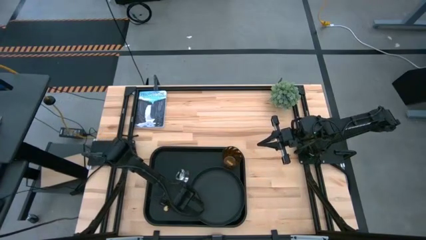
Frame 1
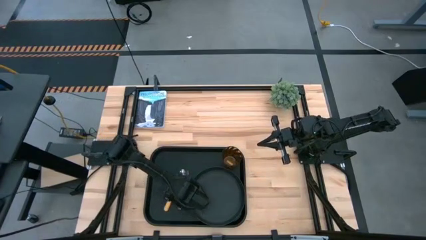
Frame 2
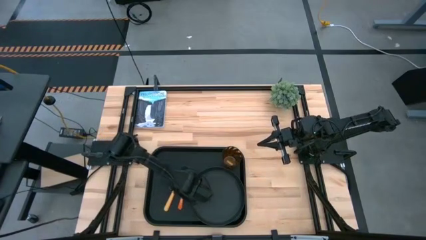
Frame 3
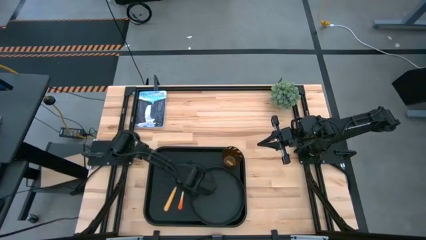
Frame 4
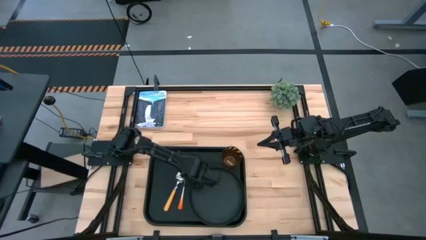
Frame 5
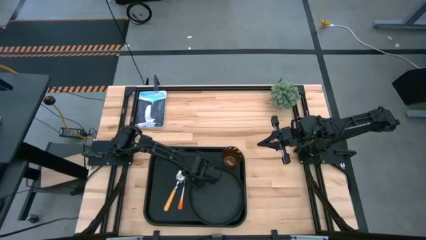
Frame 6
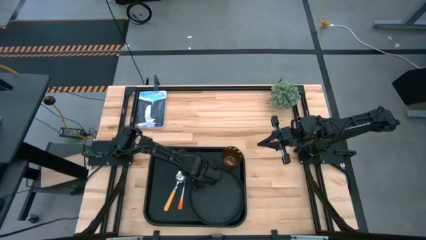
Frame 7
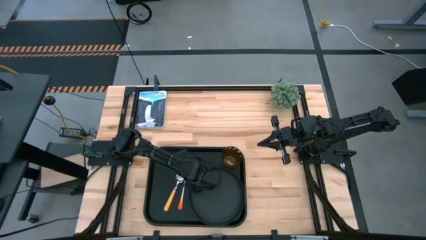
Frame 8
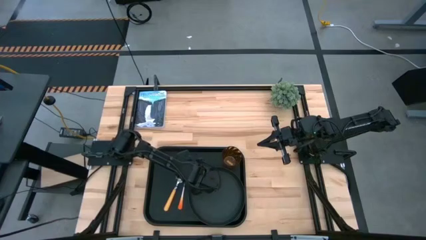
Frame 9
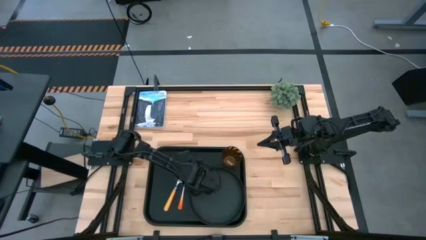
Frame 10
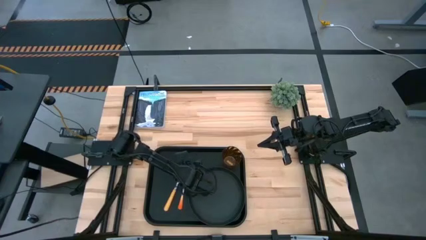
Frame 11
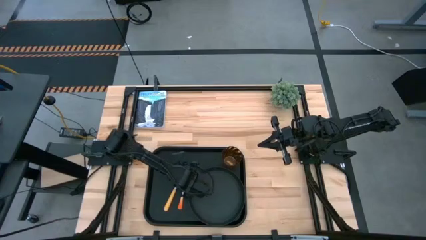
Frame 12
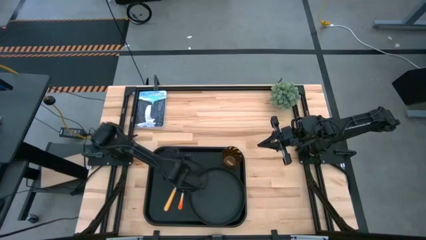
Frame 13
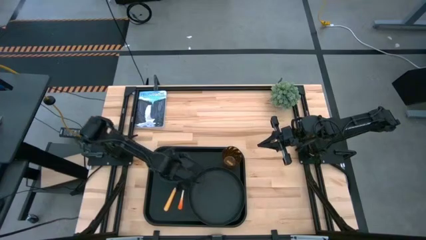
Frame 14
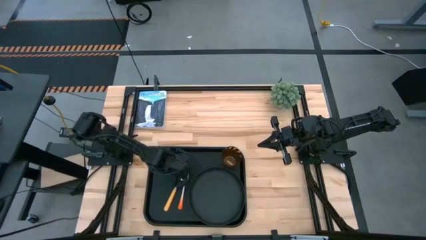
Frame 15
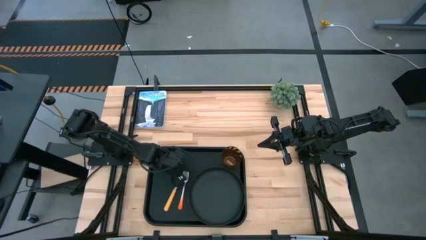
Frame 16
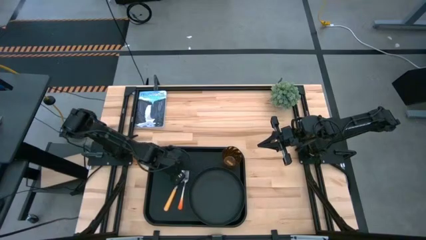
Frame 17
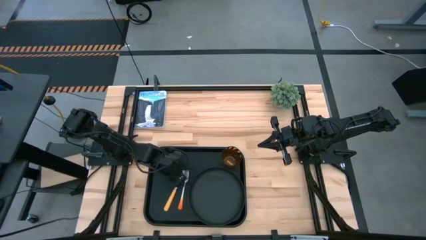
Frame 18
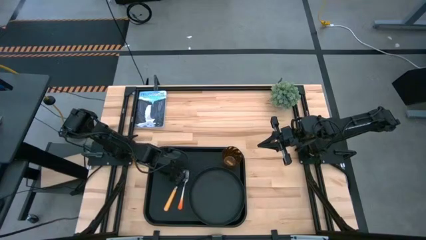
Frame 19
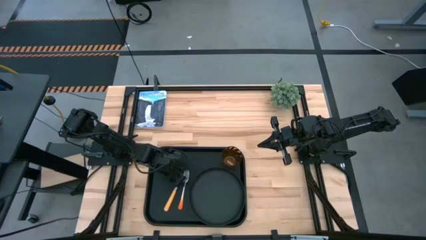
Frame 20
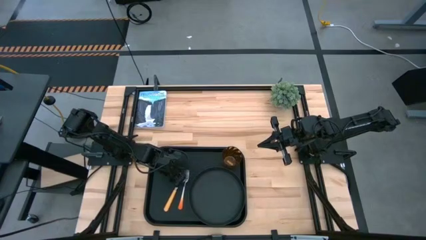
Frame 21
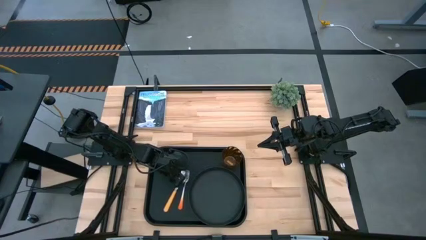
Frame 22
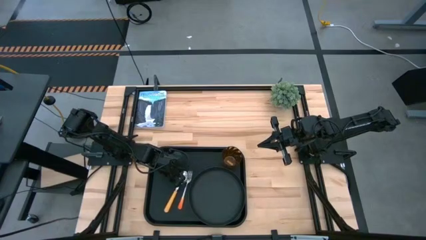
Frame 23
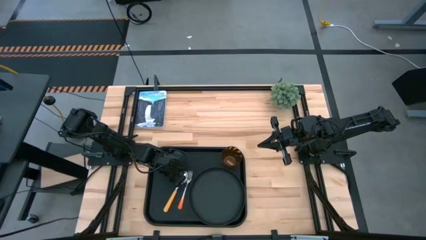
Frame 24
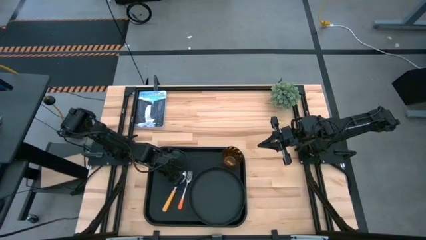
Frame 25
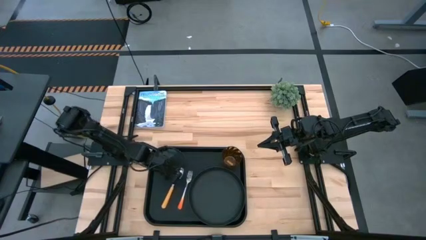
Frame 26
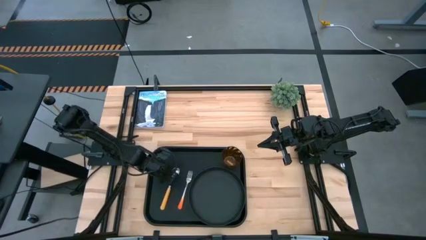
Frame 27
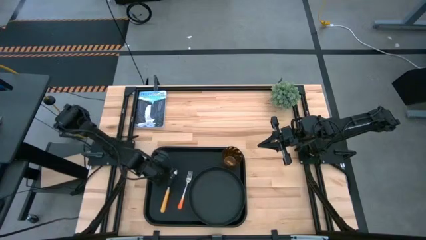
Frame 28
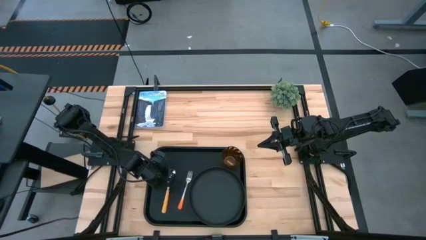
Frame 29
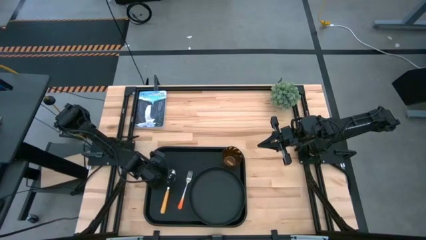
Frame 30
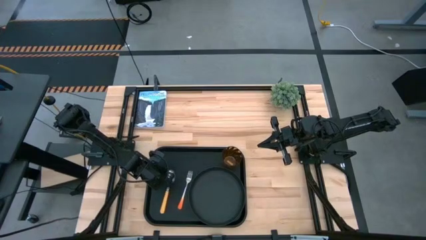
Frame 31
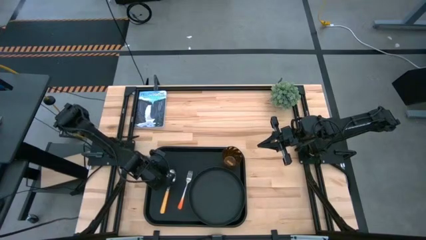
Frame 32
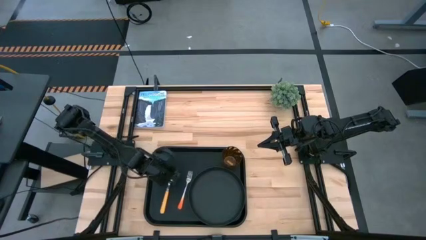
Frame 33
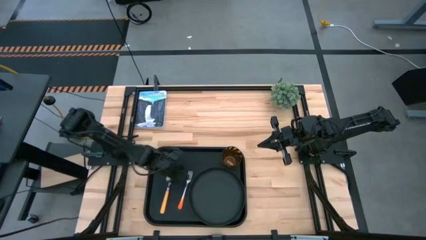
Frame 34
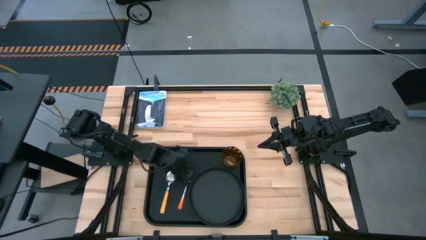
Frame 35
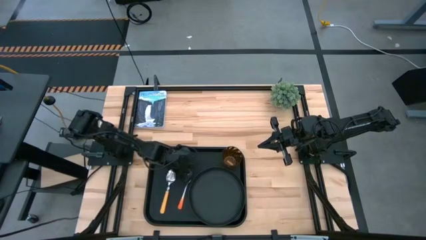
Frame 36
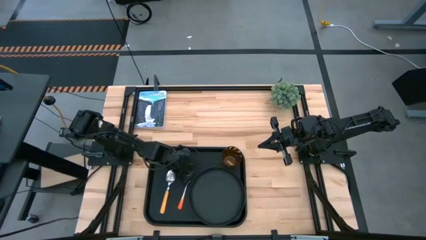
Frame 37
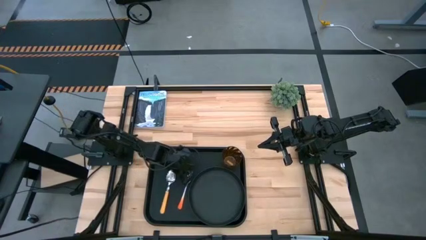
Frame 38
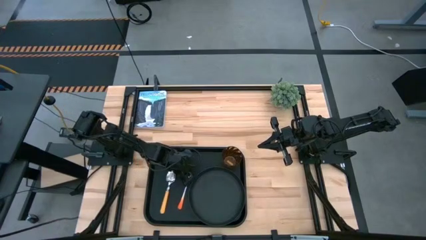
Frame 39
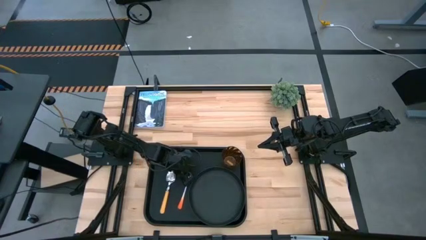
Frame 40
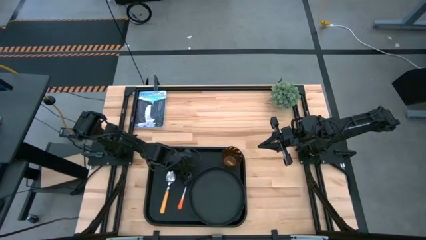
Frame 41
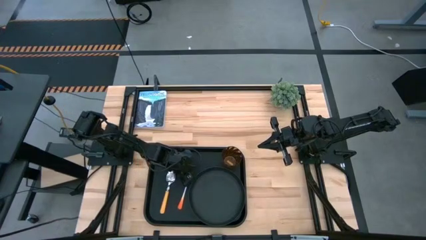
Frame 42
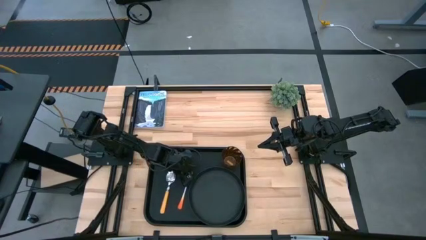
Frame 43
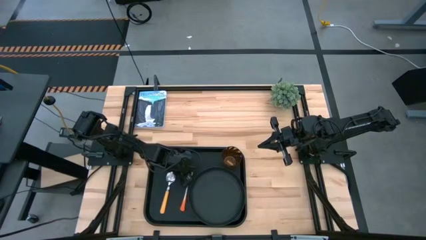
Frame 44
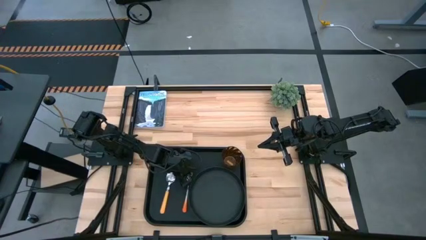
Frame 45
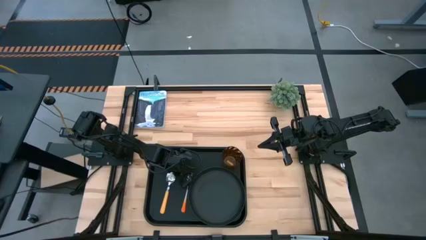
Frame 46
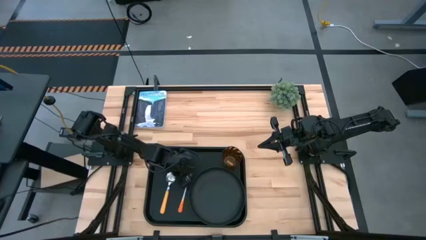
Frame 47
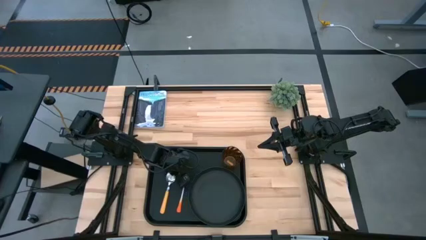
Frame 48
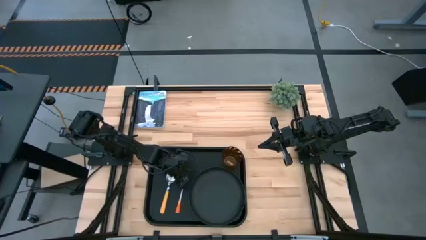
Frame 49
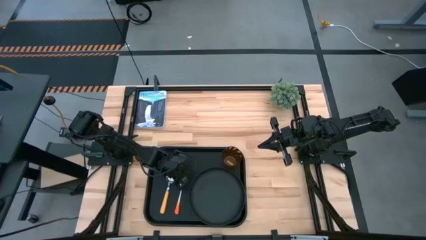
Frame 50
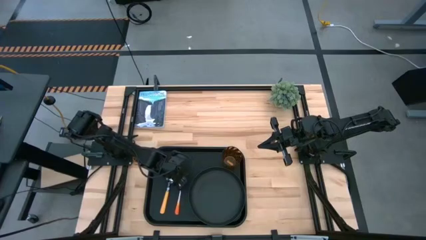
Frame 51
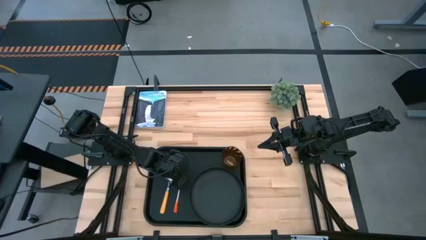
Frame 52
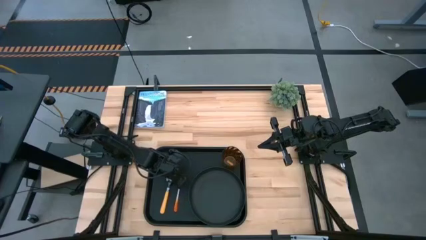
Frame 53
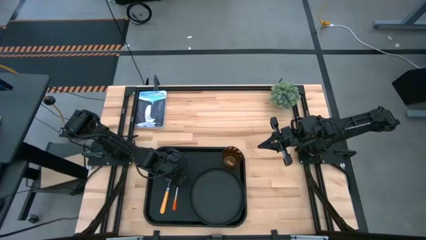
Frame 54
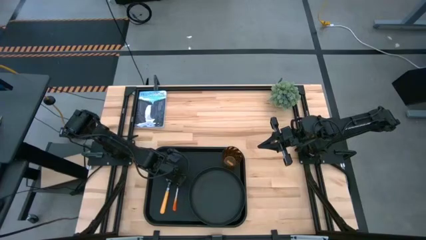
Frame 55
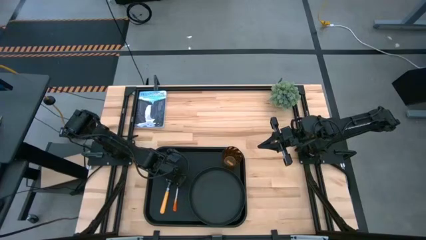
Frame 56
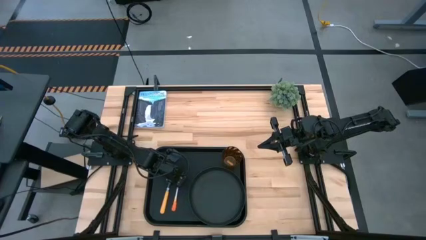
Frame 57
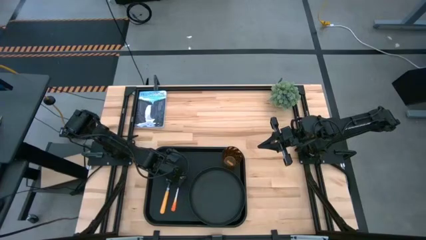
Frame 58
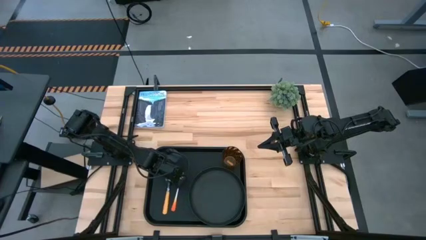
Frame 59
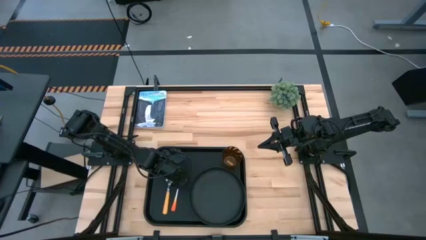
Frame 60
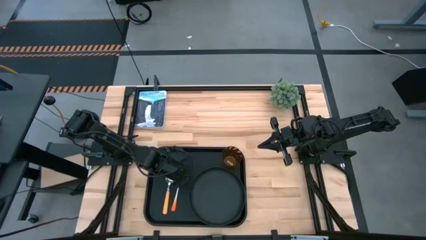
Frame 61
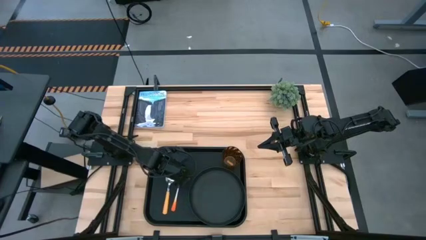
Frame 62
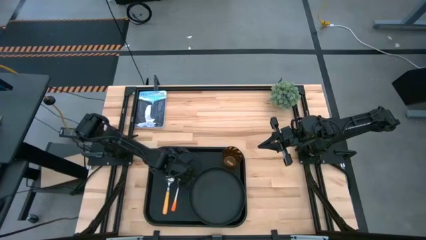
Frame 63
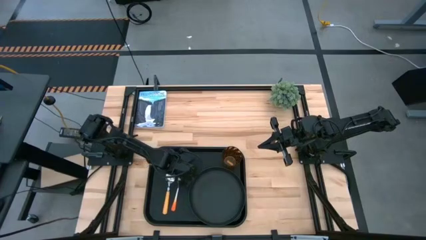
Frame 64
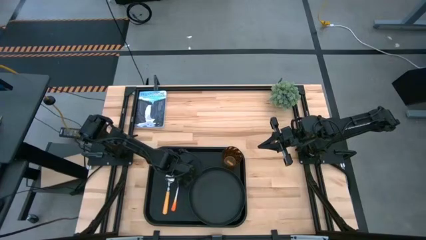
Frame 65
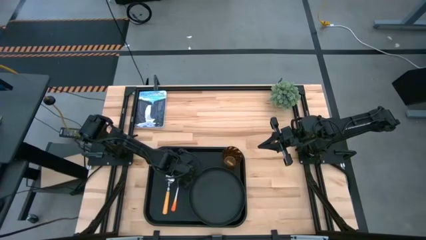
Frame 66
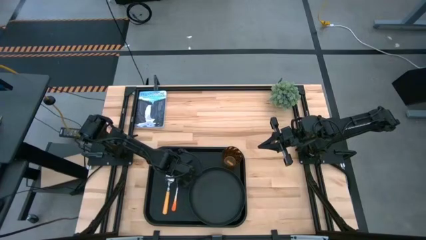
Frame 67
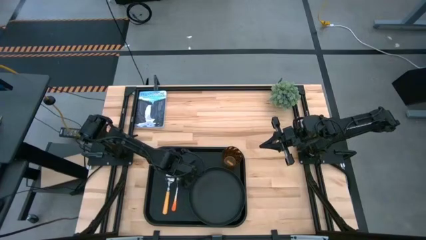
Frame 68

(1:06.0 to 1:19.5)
Task: Pick and place plate/cup/fork/spoon on tray
Adjust the silverwares on the black tray

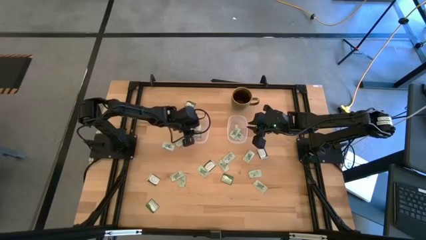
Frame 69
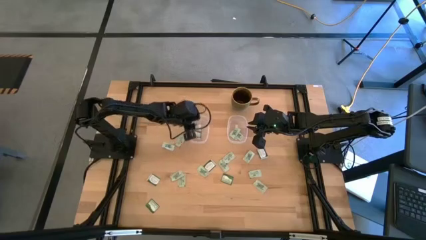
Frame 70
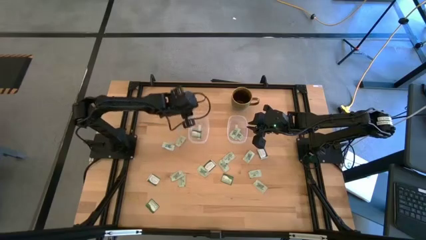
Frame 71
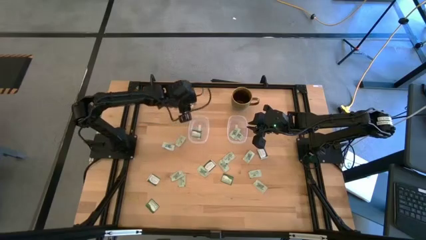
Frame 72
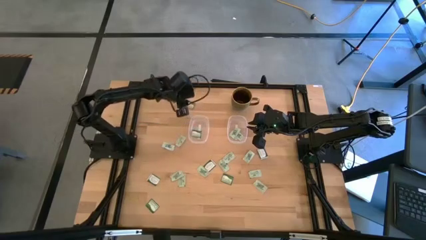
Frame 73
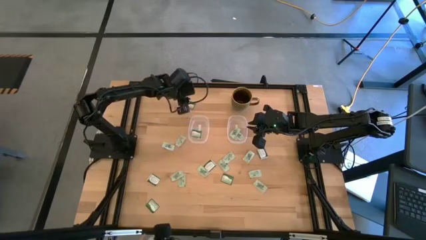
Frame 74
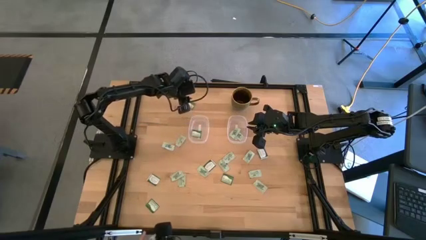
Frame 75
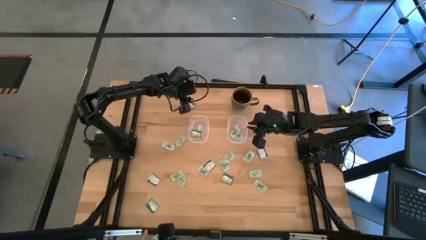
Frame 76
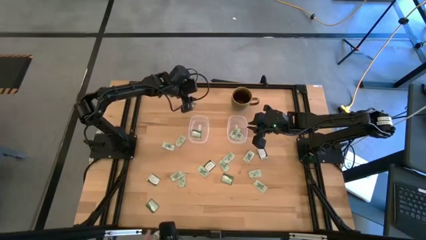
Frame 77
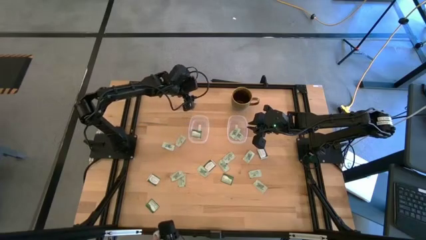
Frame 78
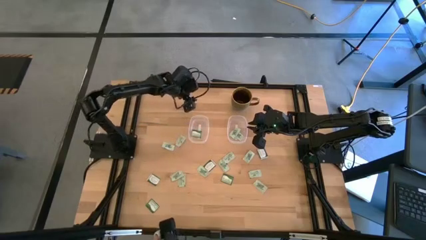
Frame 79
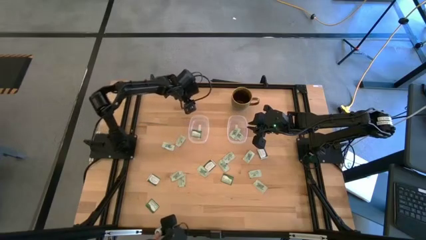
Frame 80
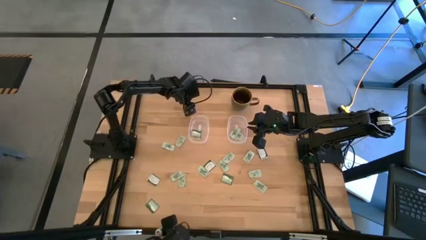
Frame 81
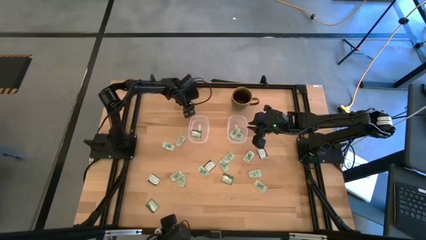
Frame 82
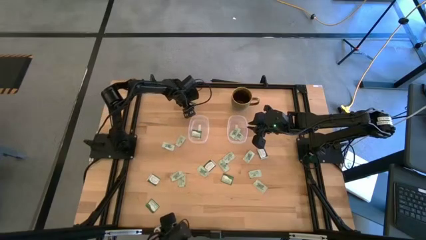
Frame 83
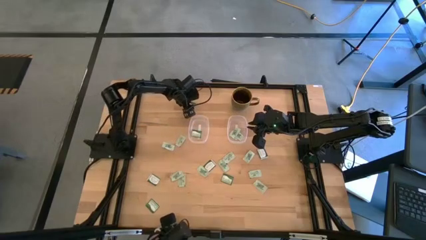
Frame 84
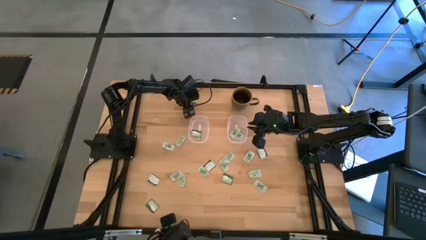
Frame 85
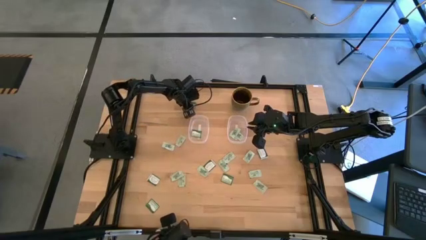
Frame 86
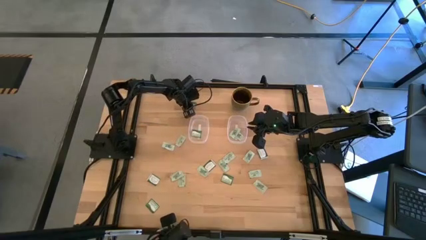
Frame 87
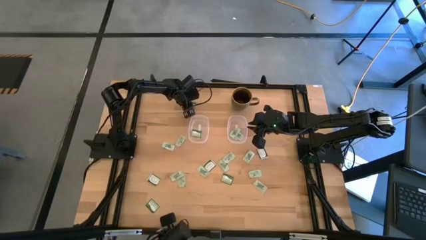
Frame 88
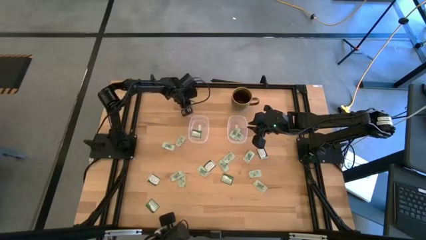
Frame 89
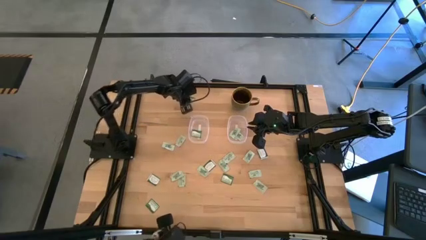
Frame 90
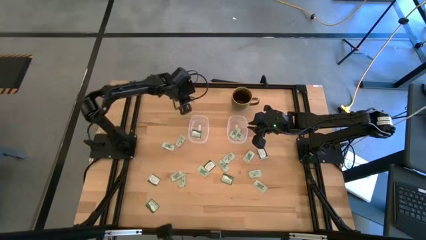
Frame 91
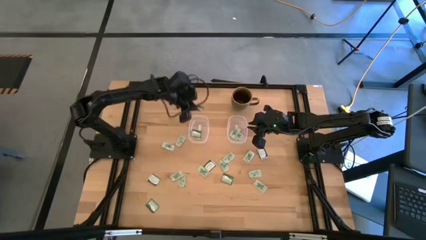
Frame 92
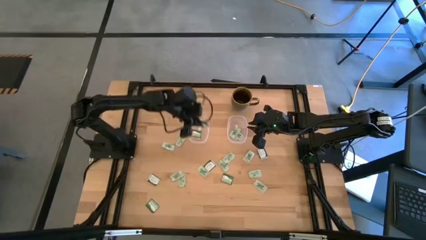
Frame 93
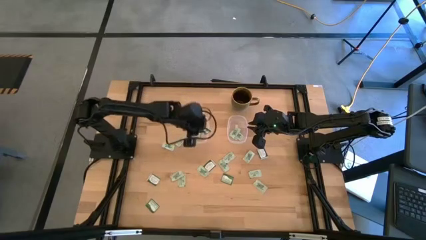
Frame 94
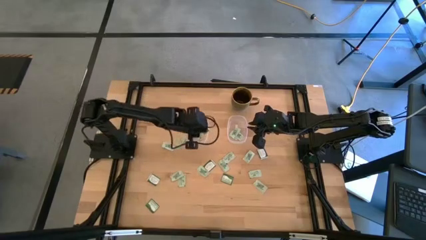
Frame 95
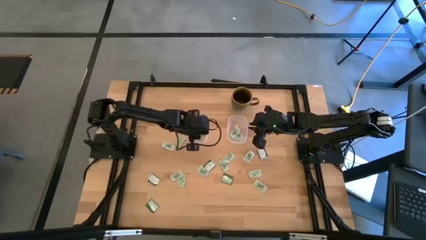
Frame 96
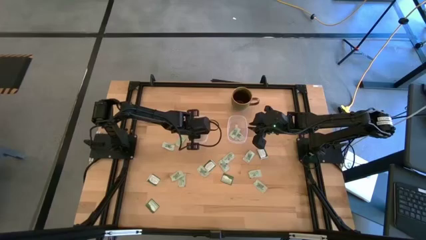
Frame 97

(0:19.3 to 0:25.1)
Task: Pick and place items into bin
Put the truvia packet into the left transparent bin
